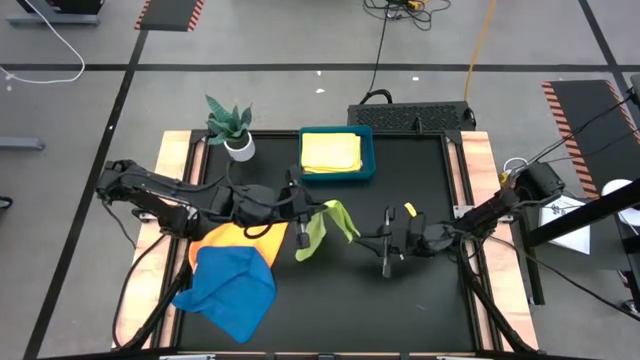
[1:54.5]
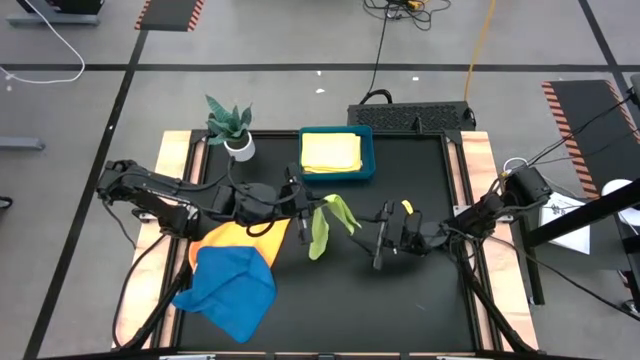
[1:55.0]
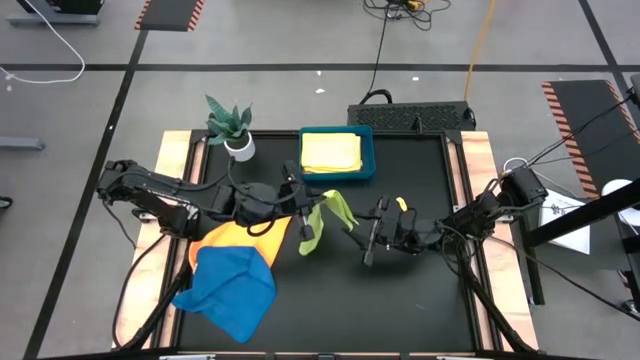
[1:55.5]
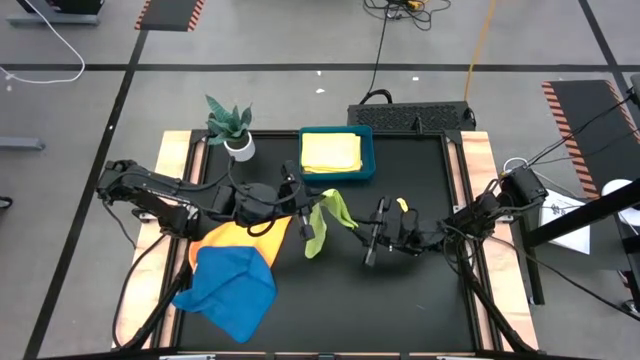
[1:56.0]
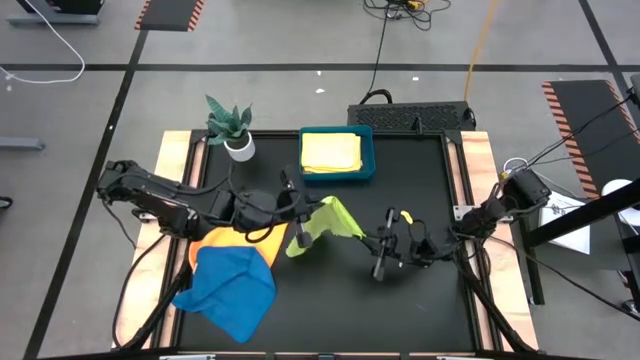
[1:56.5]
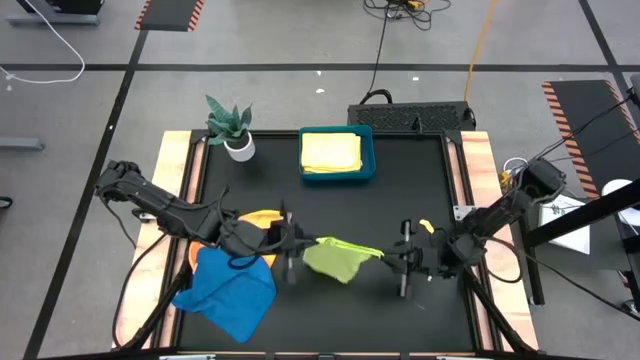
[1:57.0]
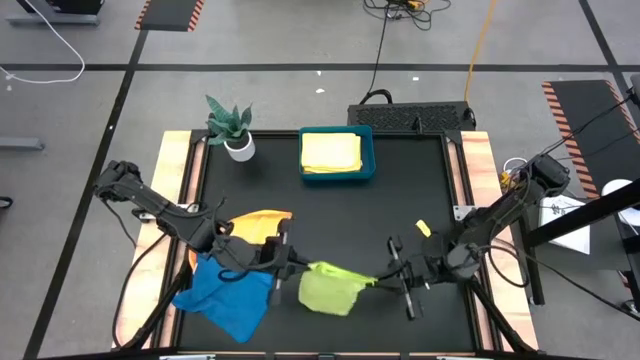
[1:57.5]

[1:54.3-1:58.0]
Task: Fold microfiber towels
Fold the green microfiber cloth

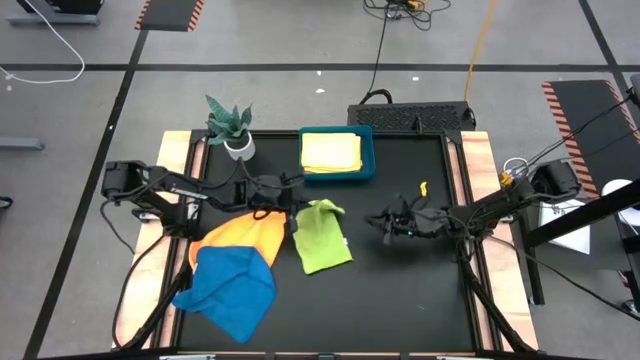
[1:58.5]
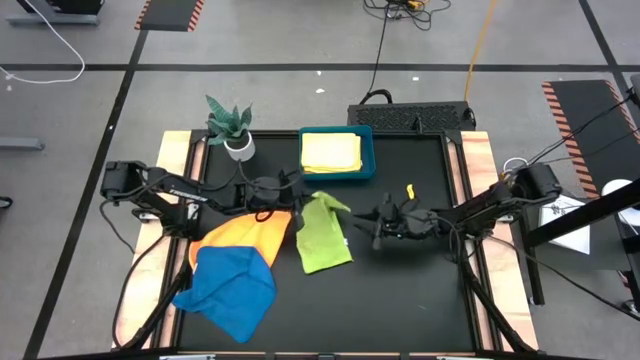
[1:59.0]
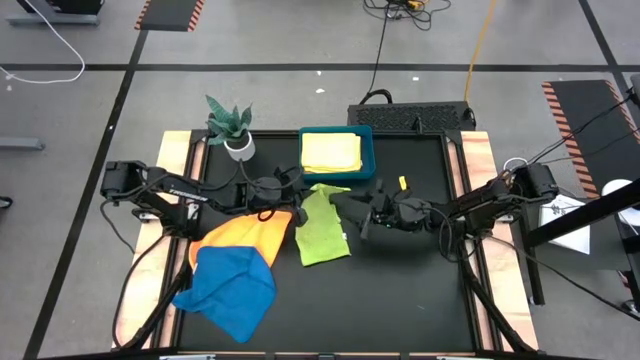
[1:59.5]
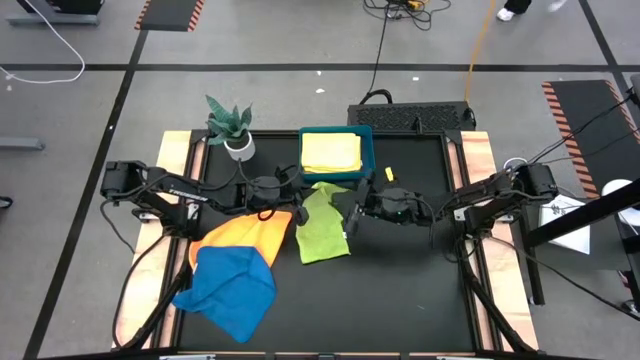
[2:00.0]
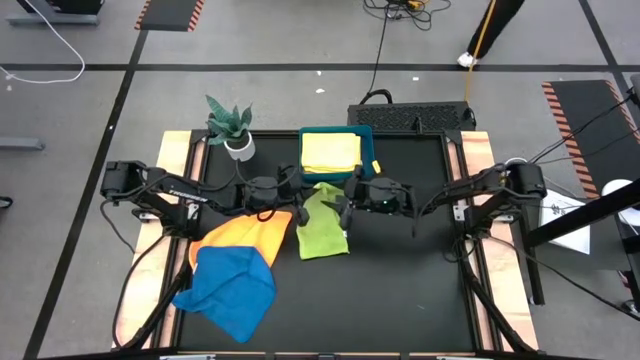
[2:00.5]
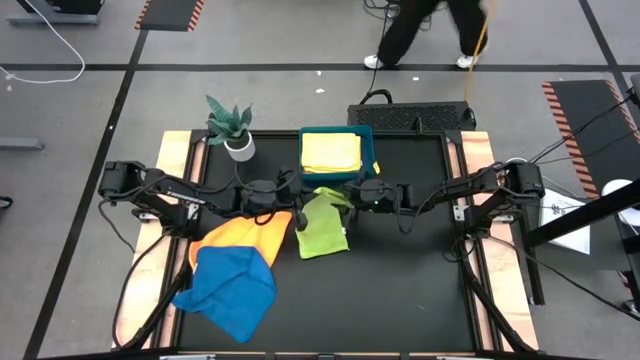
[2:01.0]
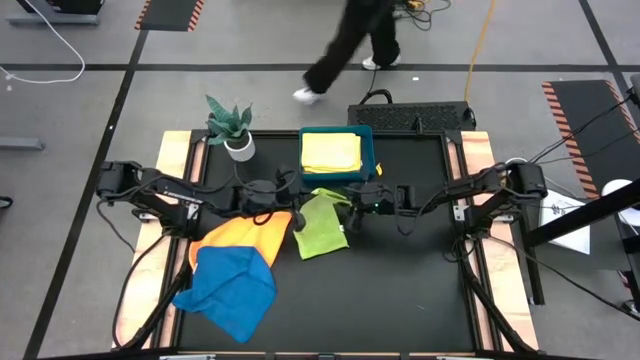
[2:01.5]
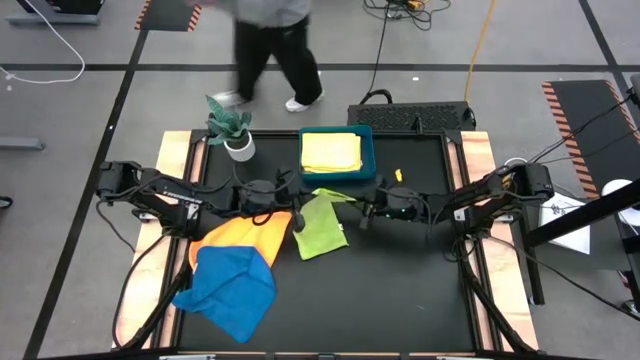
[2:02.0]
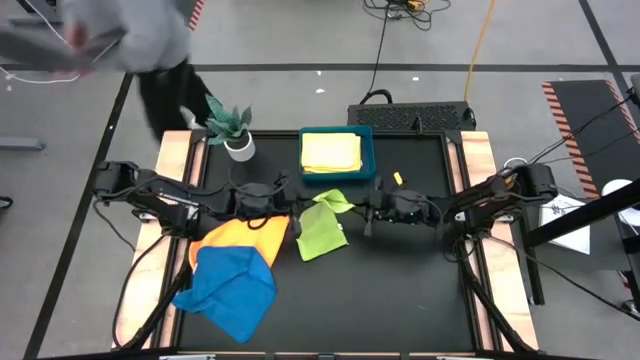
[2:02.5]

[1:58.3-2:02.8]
Fold the green microfiber cloth

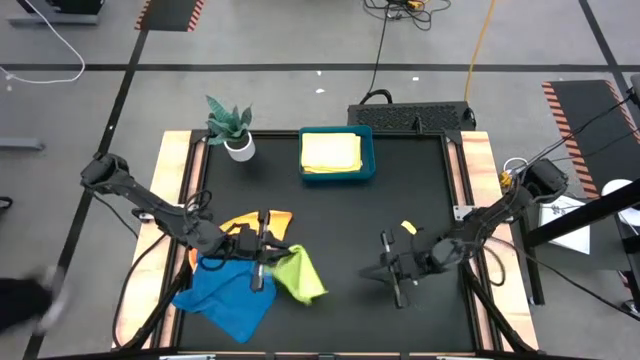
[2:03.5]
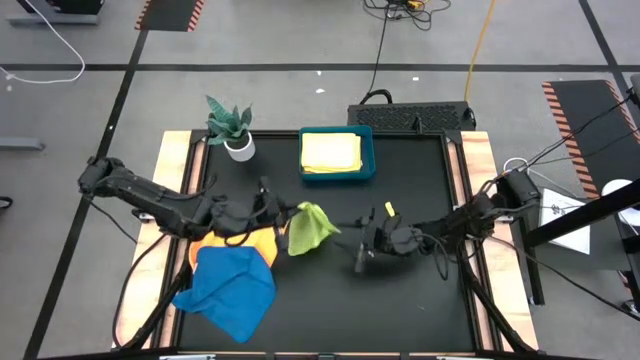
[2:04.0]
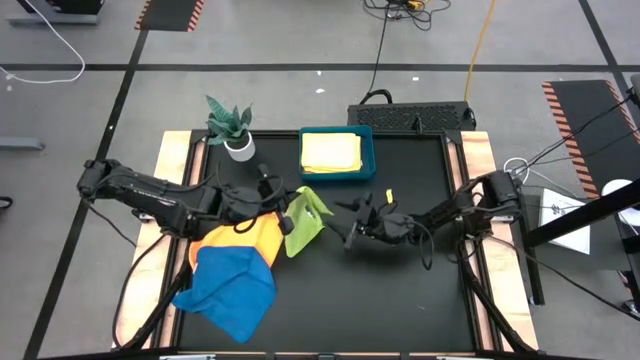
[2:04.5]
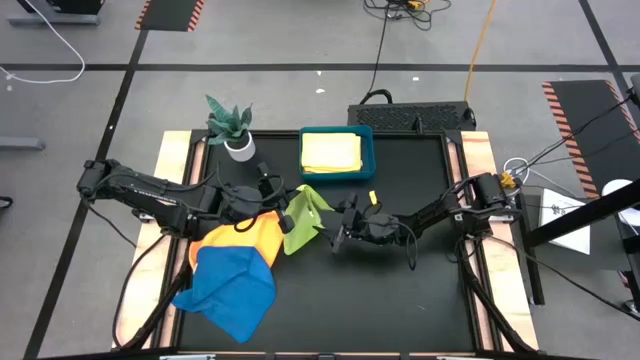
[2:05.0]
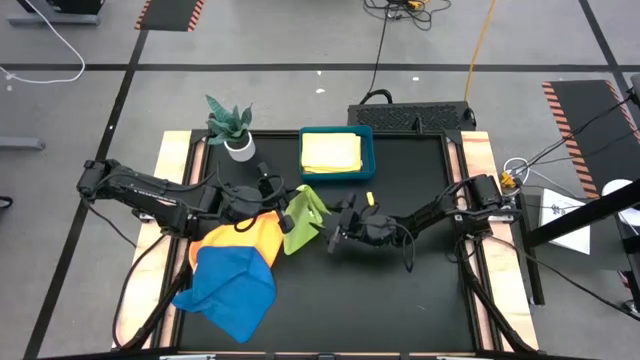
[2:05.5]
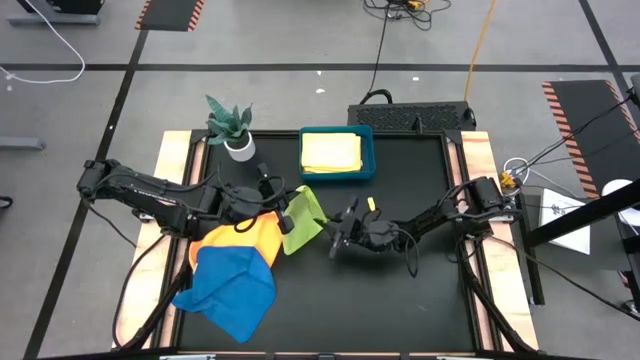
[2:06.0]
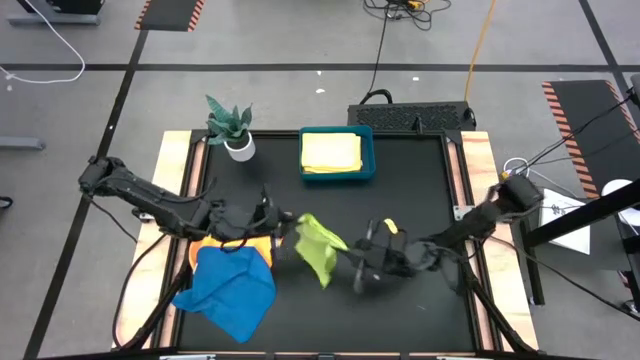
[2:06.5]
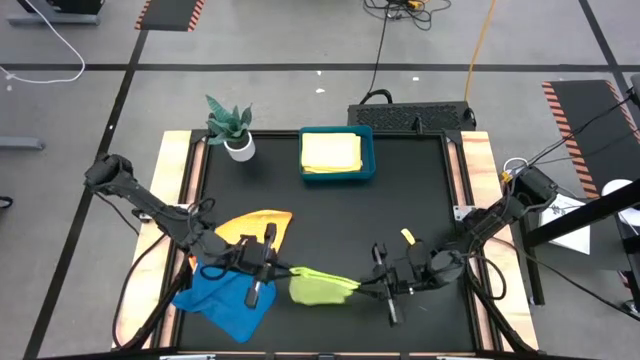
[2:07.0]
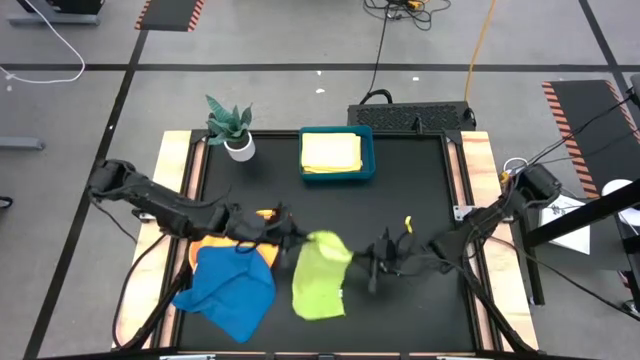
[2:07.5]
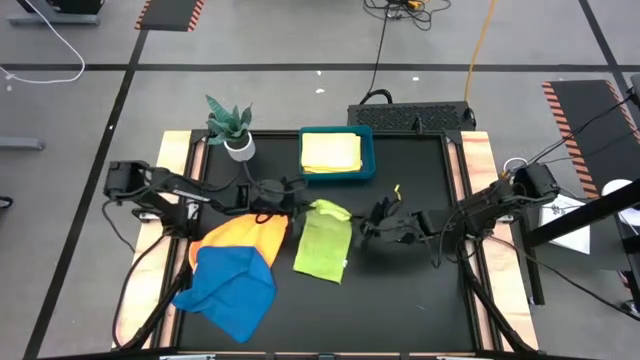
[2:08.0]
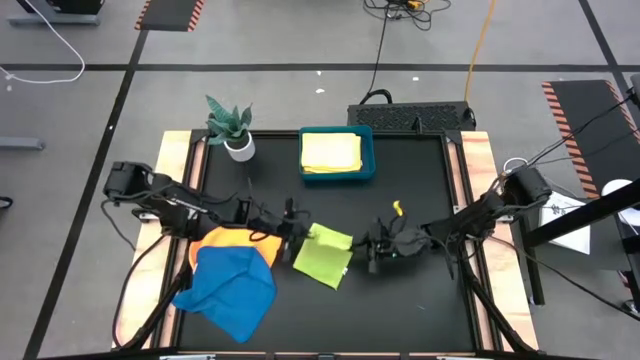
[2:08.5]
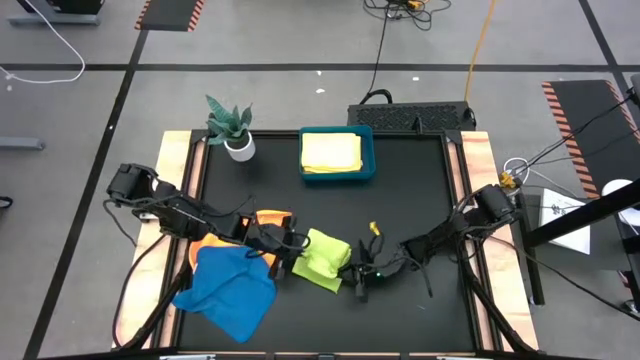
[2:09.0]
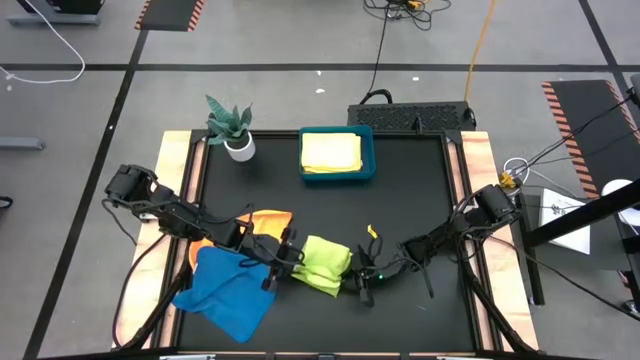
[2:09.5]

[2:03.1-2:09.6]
Fold the green microfiber cloth

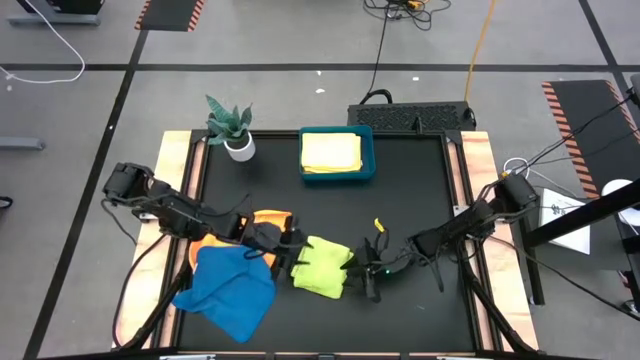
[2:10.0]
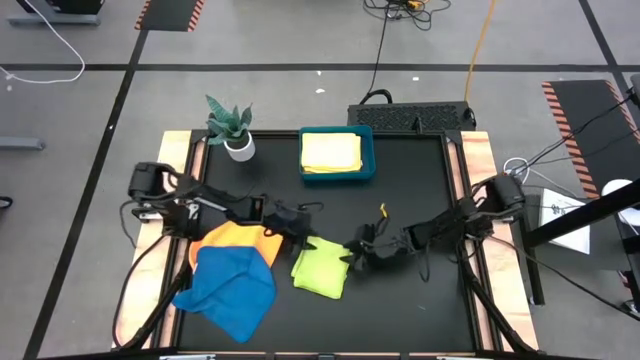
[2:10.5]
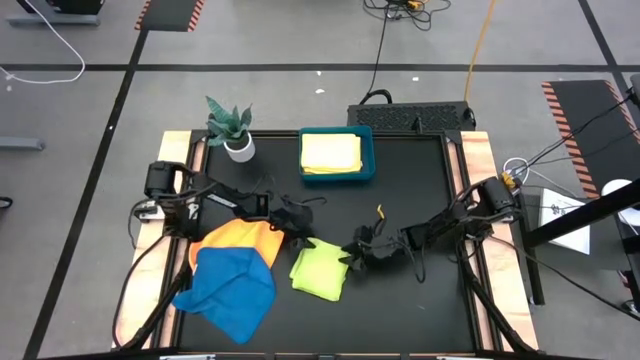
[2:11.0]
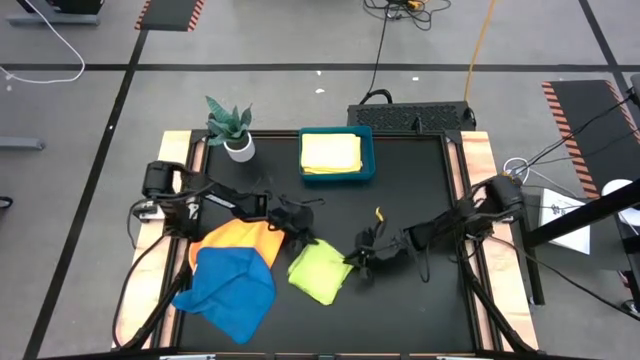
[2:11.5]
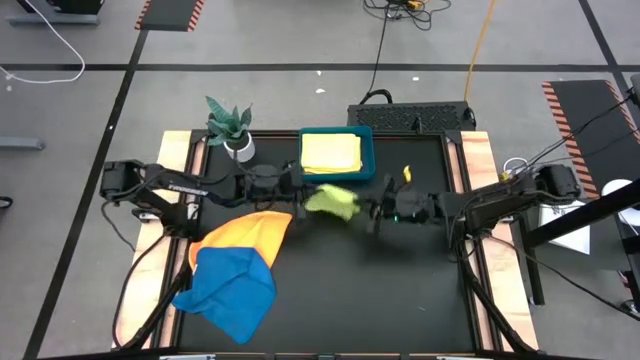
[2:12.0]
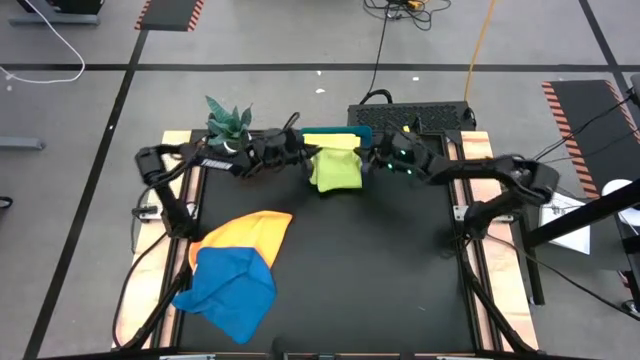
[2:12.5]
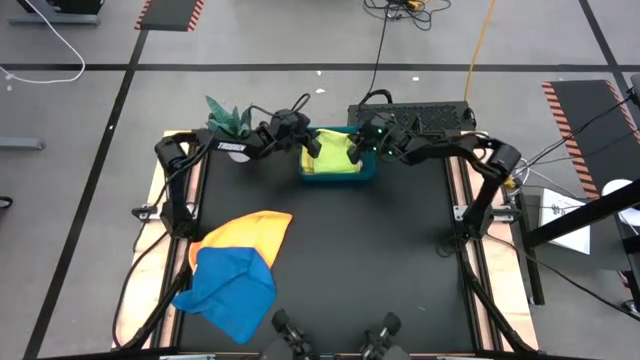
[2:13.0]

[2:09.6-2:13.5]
Put the folded green microfiber cloth into the blue bin

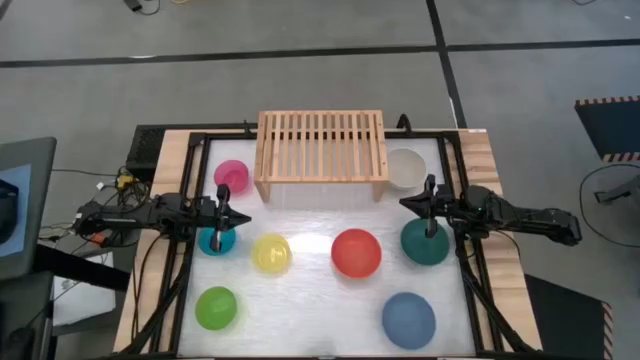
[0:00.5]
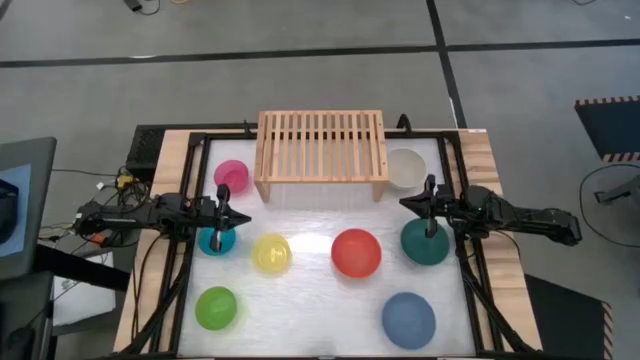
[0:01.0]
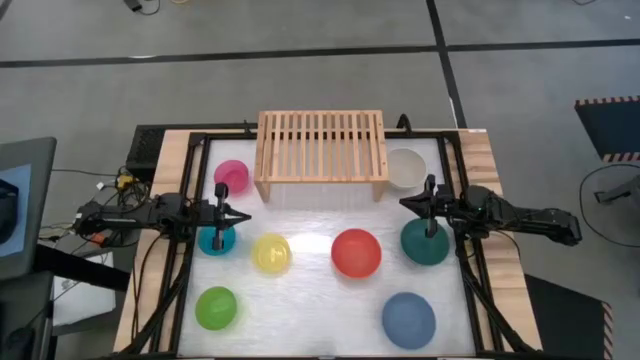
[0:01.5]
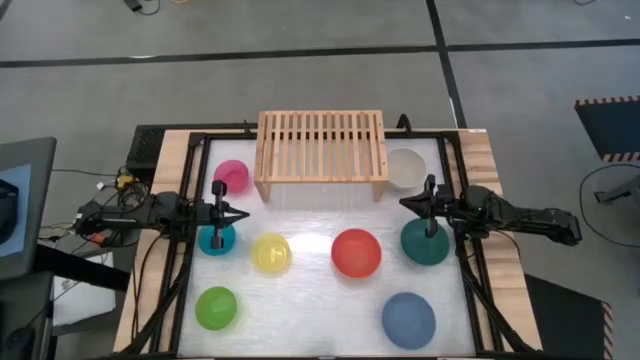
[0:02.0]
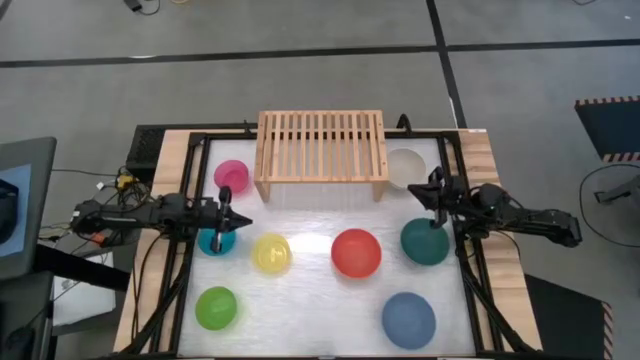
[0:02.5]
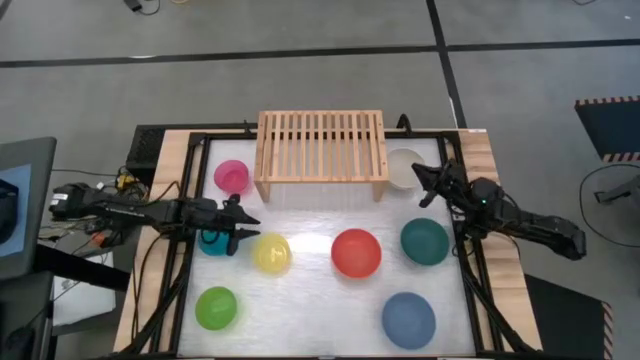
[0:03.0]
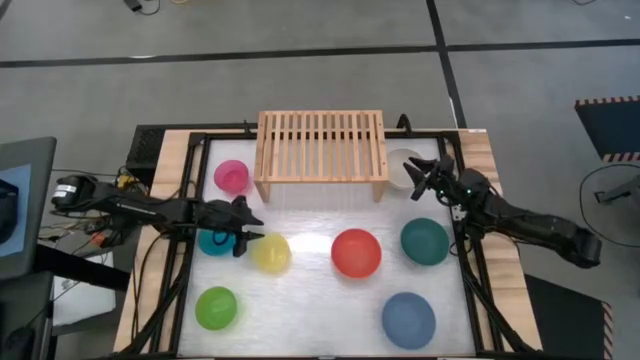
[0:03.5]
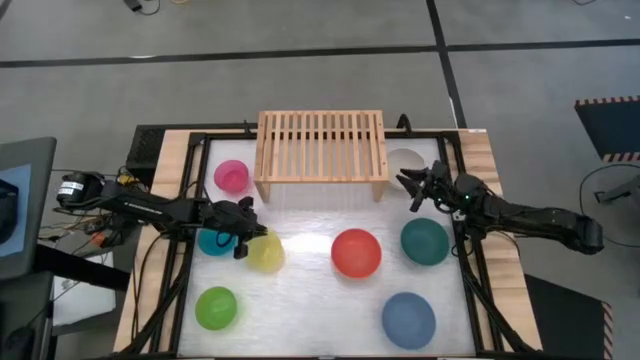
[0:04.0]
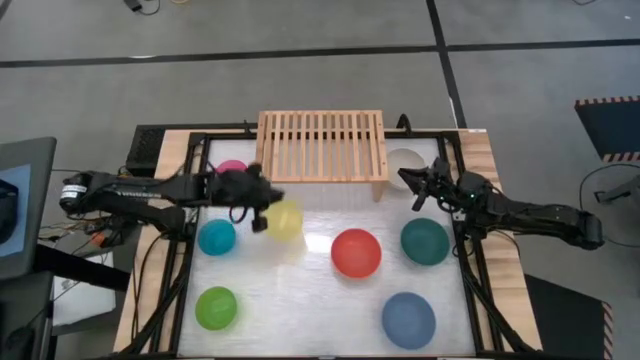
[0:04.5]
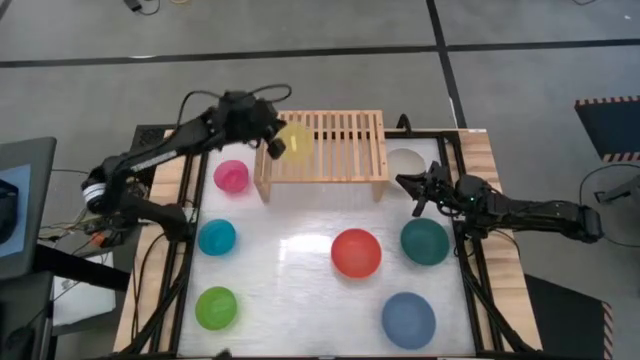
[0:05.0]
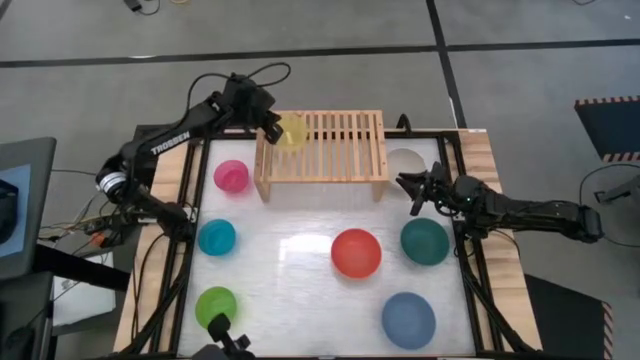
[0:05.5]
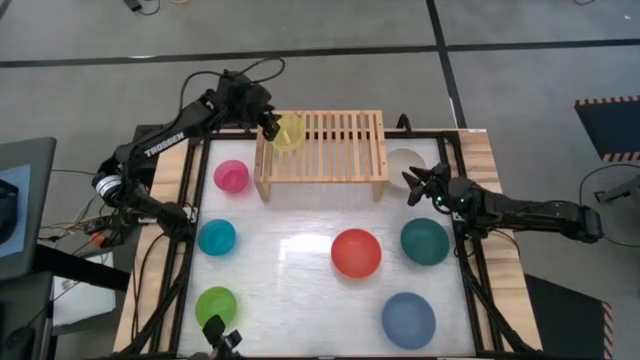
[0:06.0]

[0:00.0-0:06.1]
Task: Place and stack bowls onto a shelf
Put the yellow bowl on the shelf
